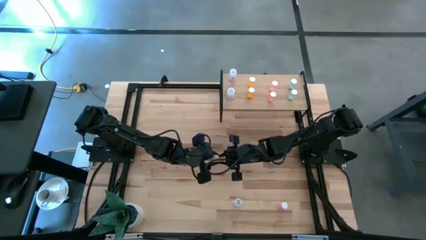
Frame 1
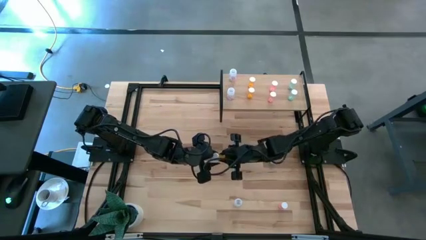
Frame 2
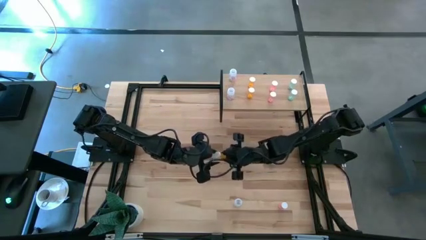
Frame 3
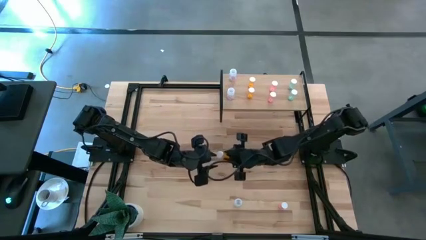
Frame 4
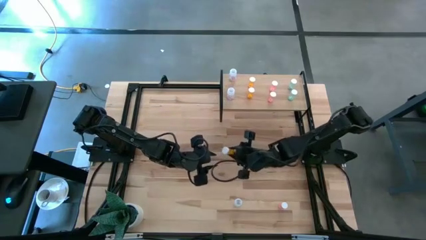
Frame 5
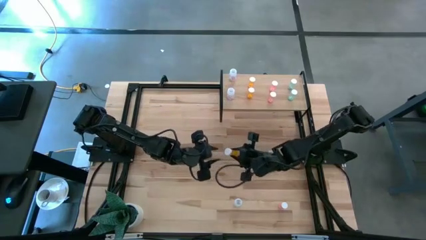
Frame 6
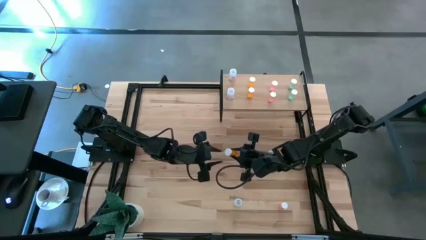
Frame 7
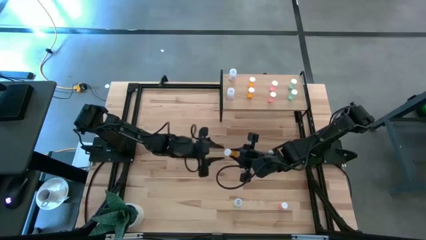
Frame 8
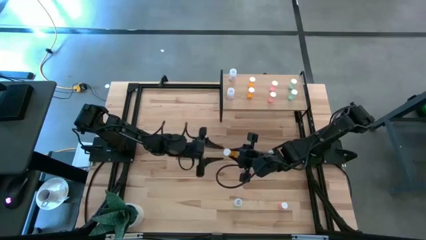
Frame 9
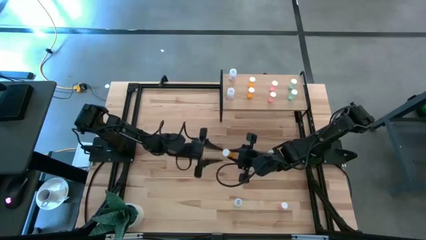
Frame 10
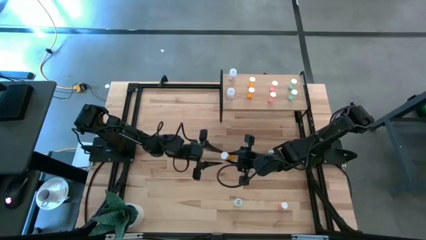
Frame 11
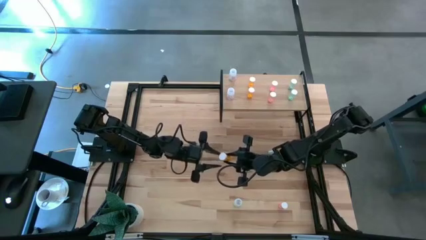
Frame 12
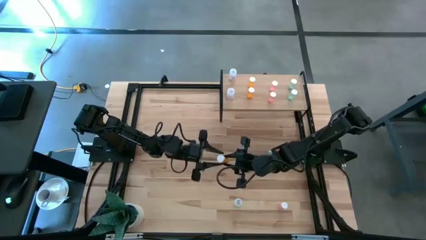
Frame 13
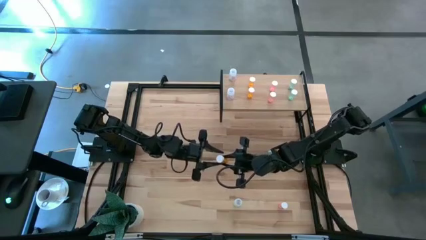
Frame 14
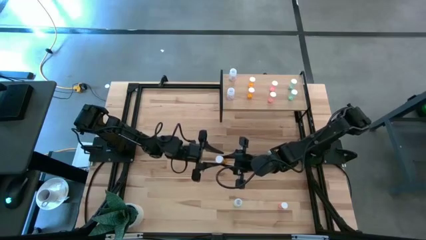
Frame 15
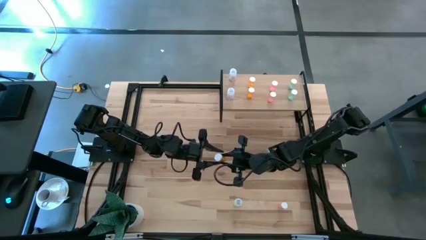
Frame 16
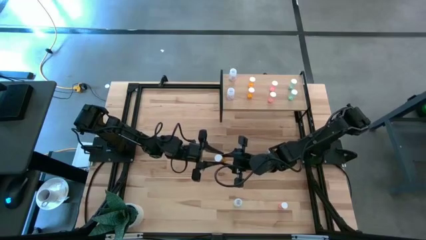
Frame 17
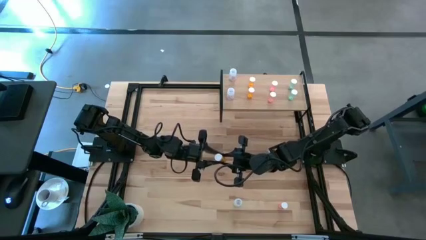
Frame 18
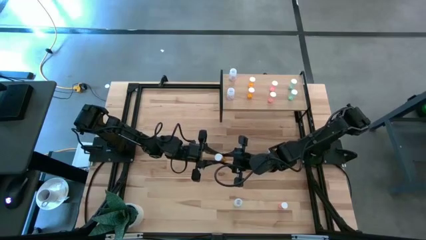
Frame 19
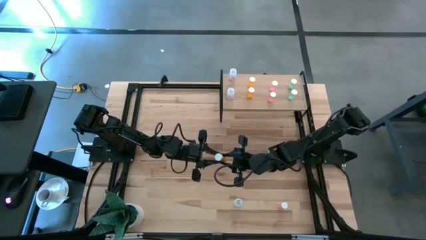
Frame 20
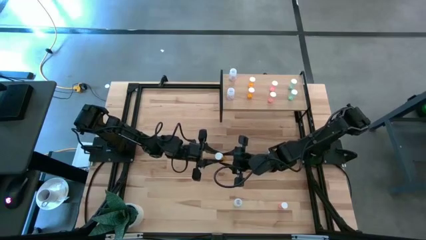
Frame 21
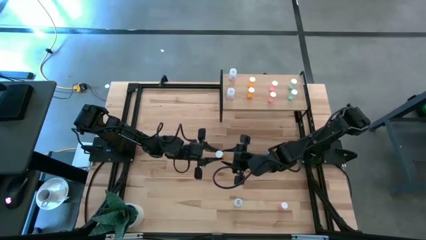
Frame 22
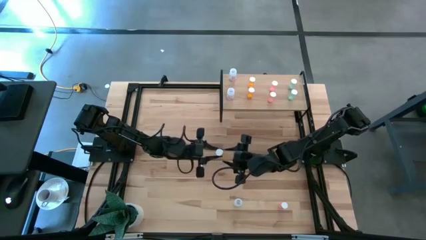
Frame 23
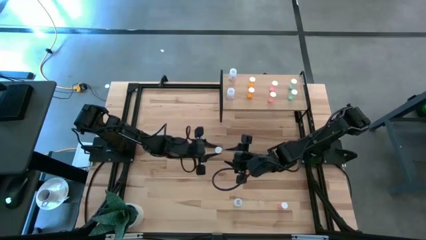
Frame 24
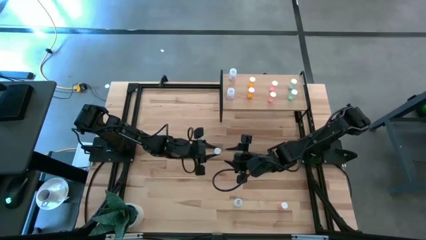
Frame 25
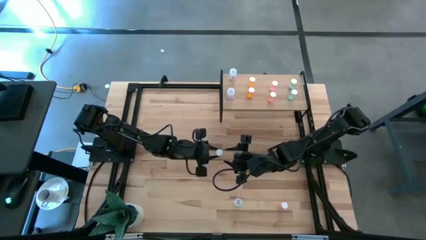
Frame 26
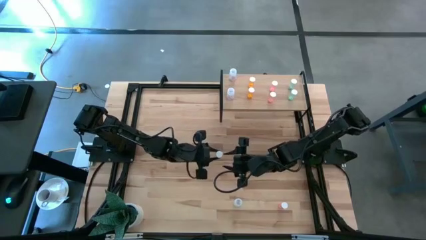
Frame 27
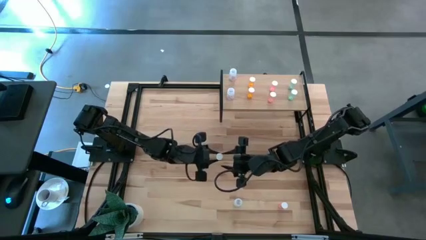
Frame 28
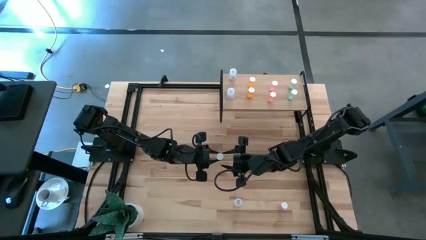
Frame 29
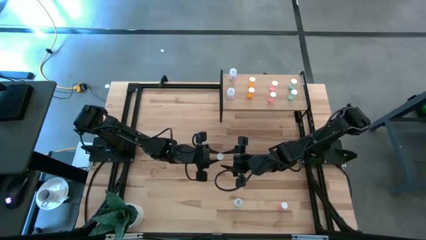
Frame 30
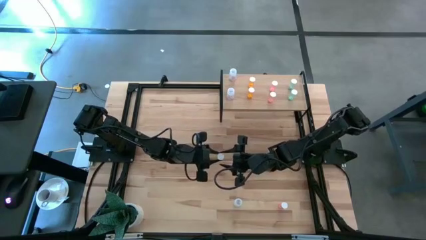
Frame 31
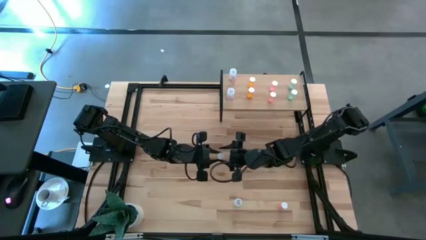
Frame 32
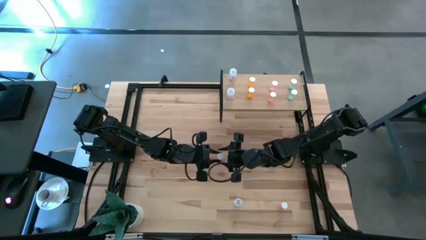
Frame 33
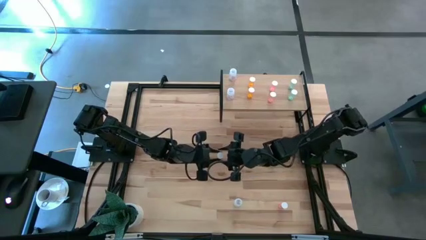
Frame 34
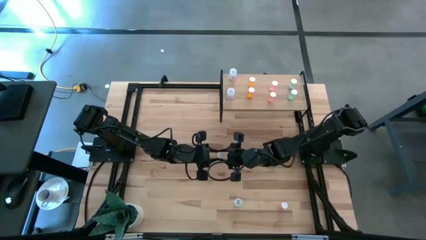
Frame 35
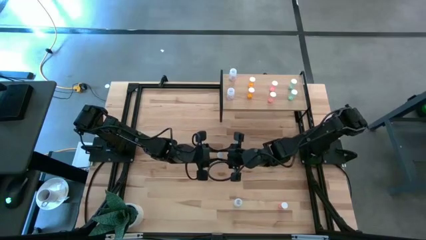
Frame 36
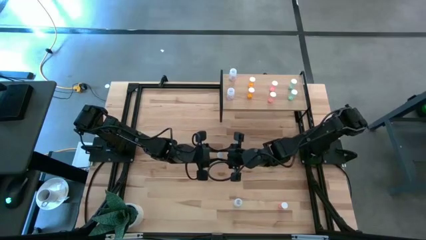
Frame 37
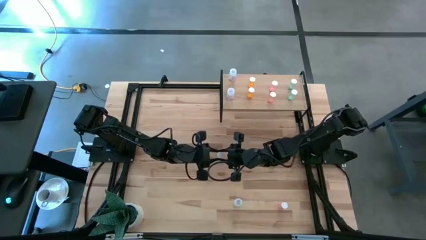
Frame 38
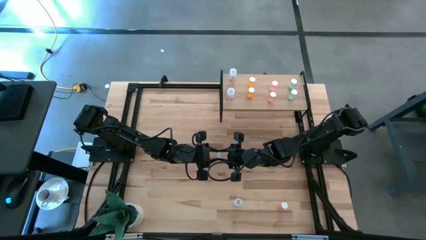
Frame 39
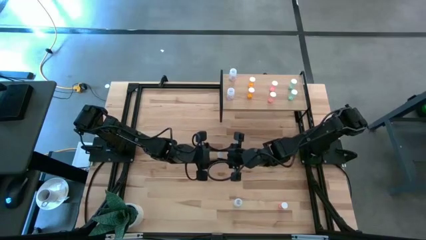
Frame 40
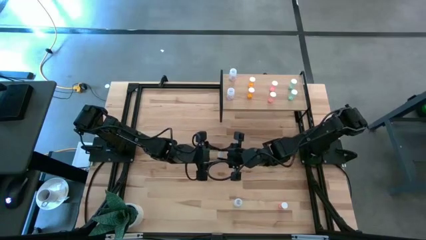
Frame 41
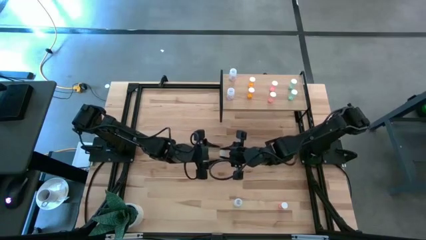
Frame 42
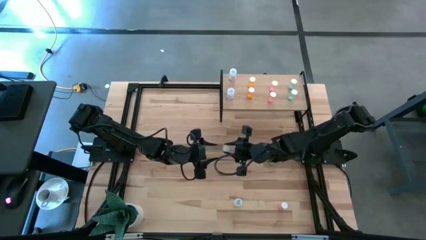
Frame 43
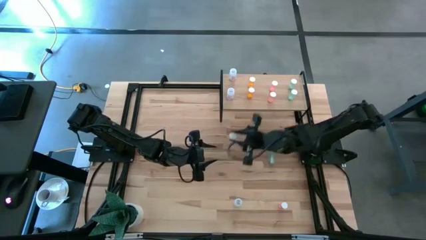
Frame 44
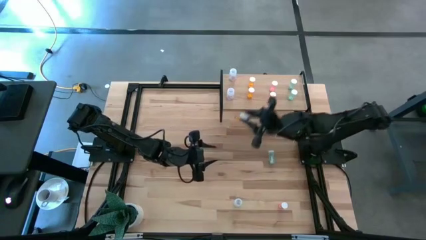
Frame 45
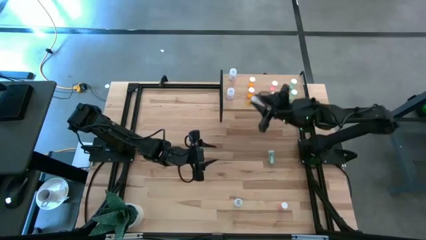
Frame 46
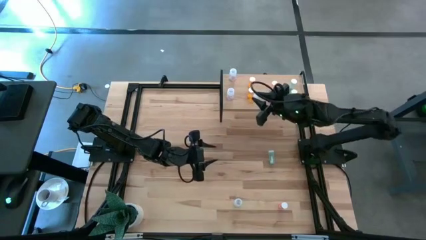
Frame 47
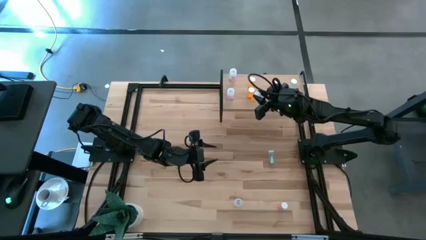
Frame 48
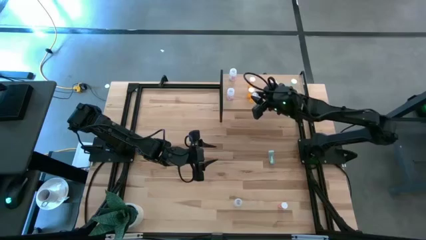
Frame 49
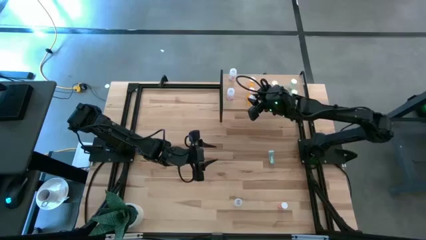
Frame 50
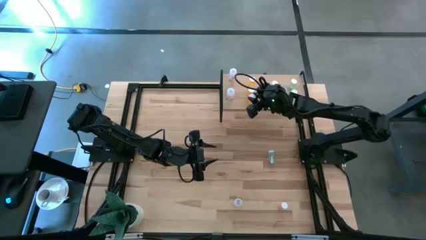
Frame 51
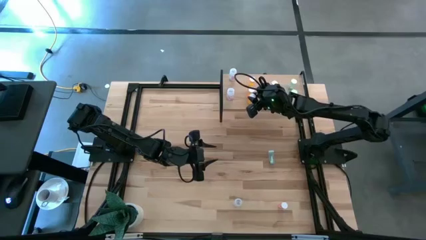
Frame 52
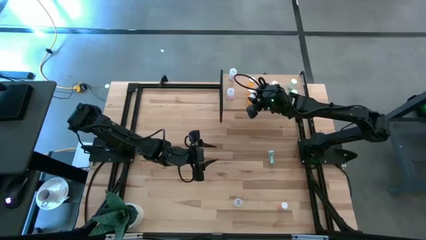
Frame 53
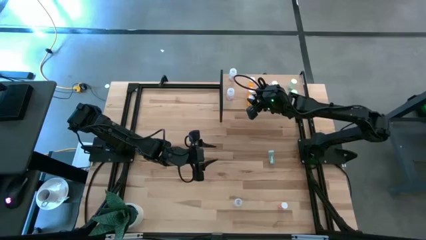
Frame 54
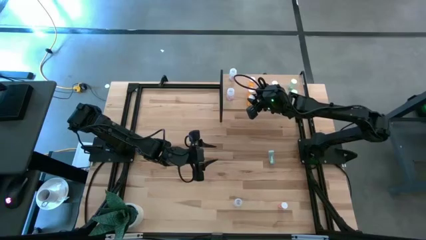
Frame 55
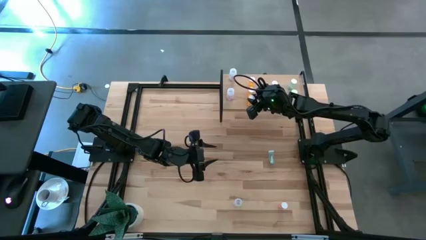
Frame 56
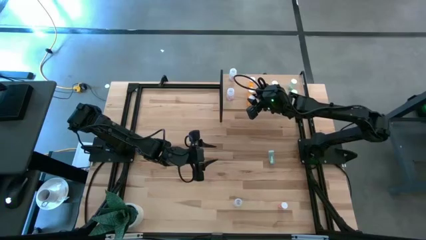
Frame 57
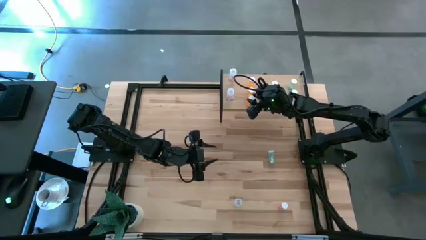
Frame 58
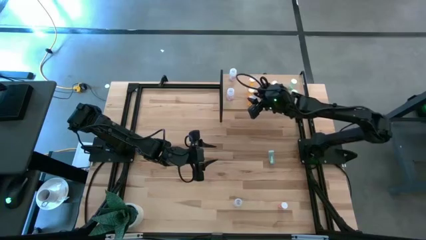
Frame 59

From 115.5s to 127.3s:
Task: Pick and place medicine bottles onto shelf by color
Put the orange pill bottle on the shelf aligned with the other orange pill bottle
